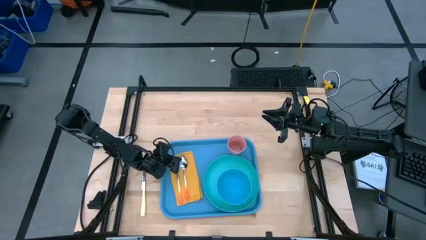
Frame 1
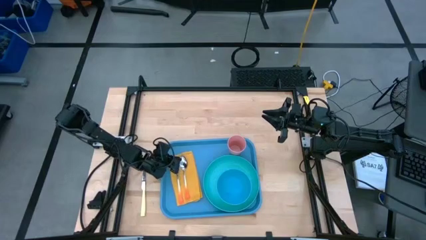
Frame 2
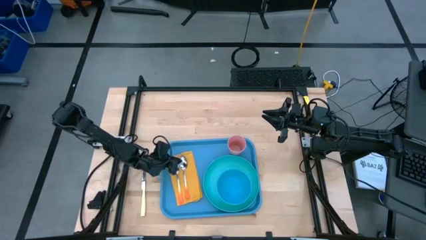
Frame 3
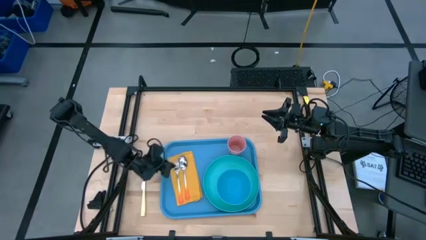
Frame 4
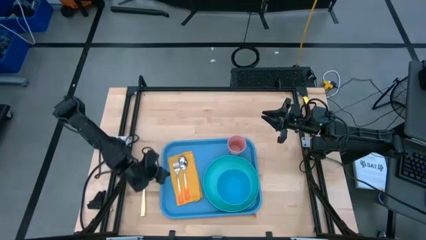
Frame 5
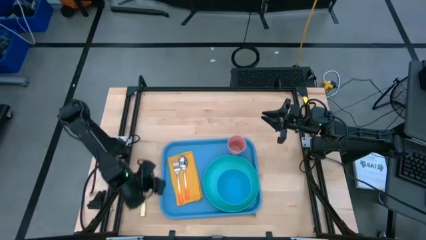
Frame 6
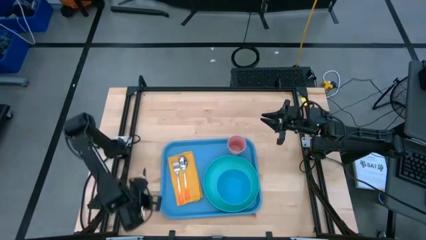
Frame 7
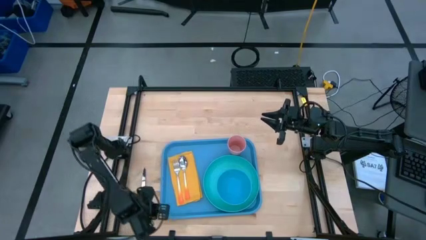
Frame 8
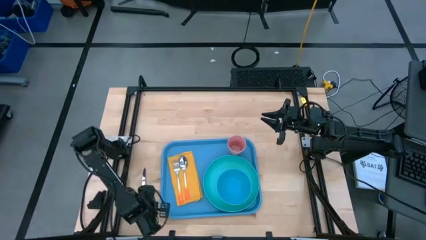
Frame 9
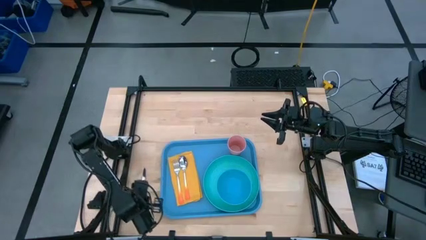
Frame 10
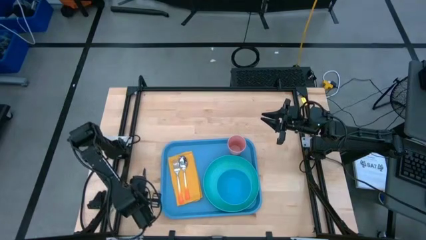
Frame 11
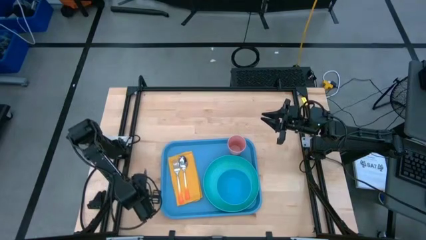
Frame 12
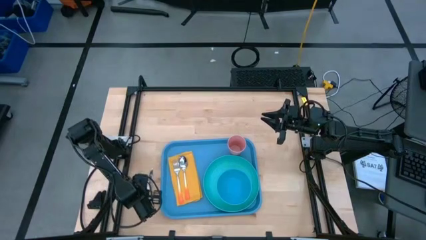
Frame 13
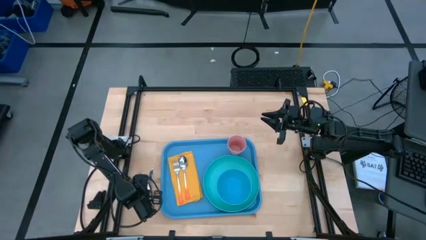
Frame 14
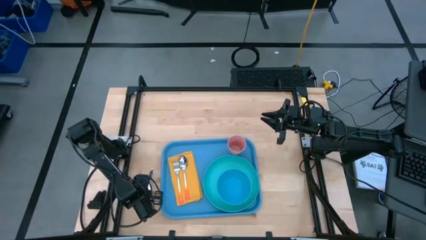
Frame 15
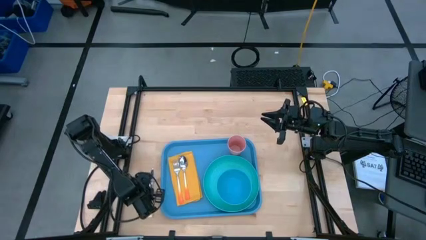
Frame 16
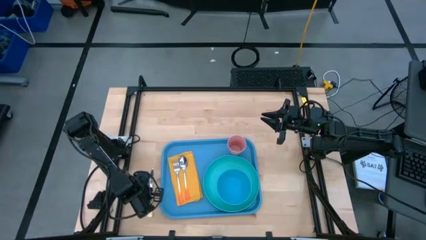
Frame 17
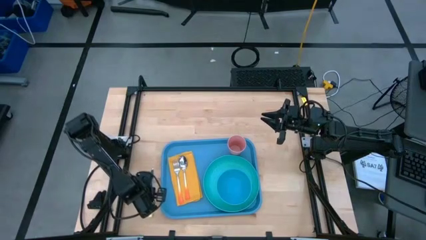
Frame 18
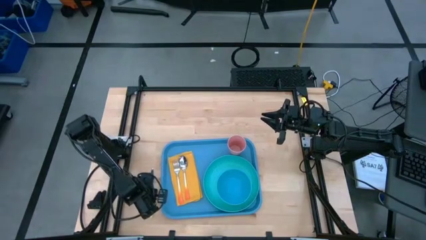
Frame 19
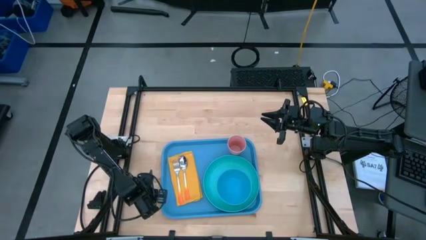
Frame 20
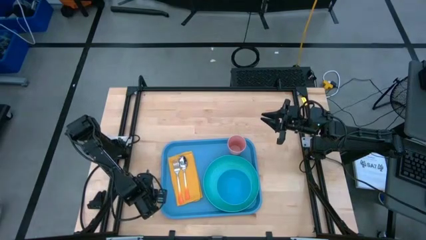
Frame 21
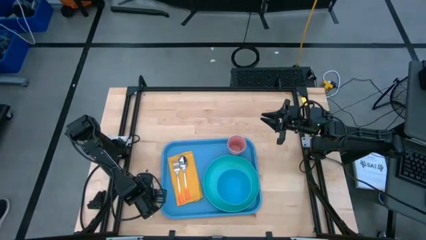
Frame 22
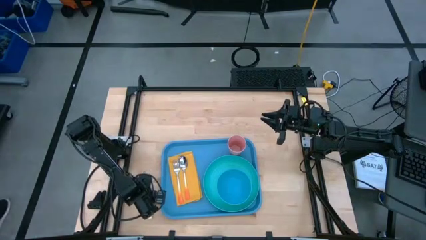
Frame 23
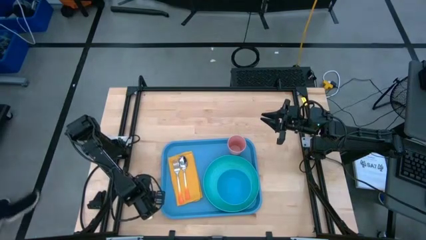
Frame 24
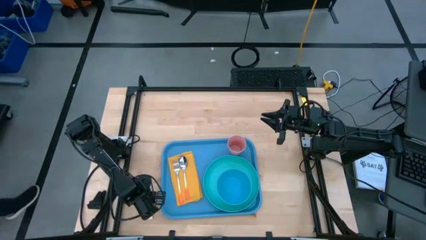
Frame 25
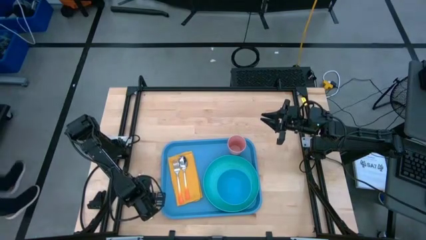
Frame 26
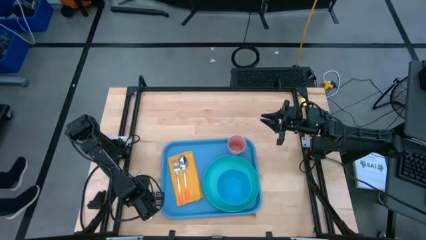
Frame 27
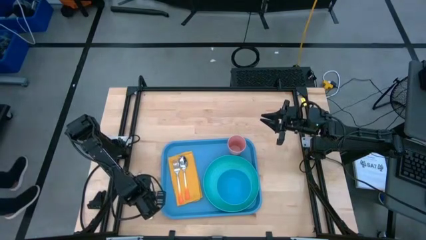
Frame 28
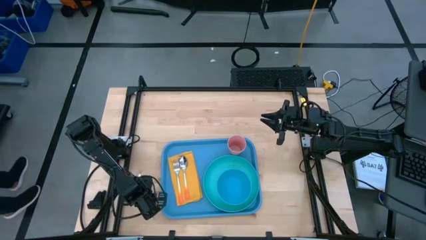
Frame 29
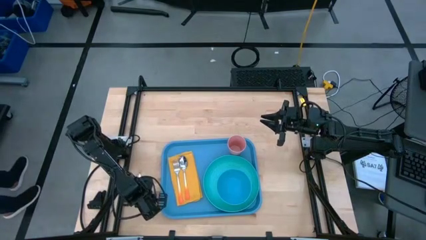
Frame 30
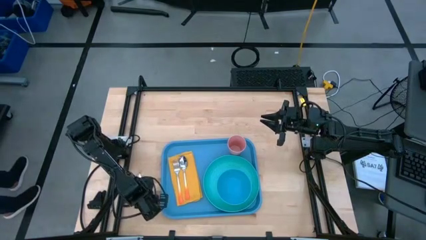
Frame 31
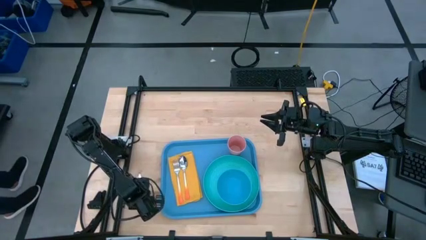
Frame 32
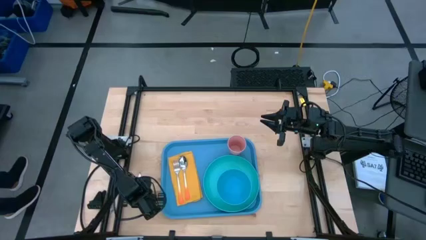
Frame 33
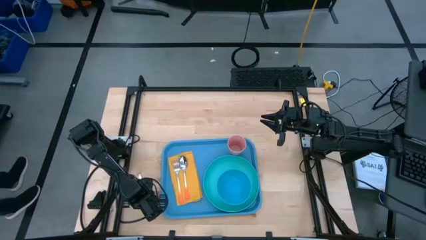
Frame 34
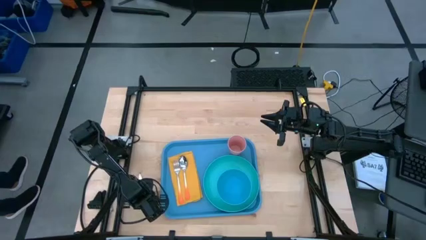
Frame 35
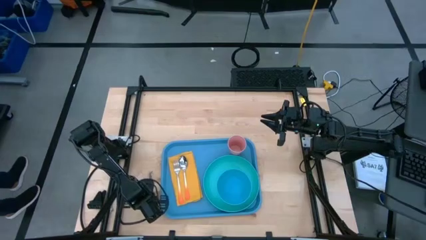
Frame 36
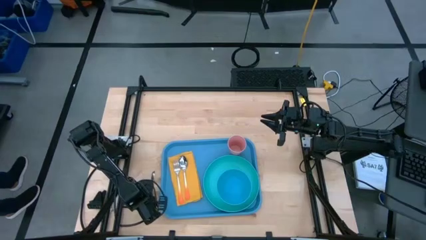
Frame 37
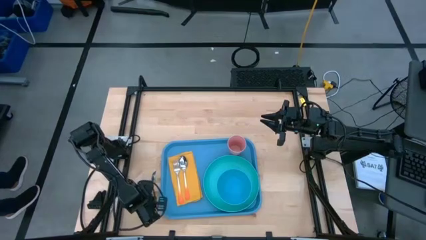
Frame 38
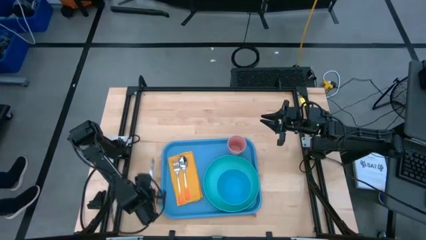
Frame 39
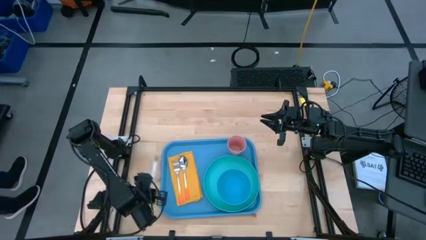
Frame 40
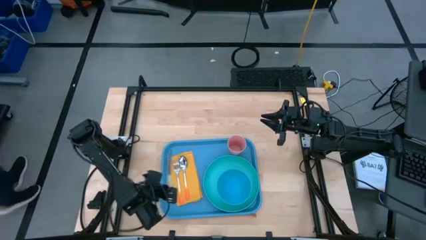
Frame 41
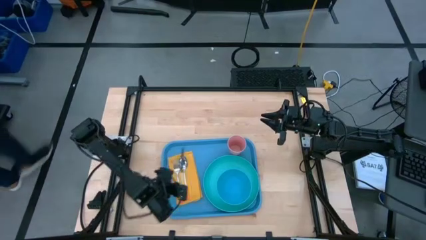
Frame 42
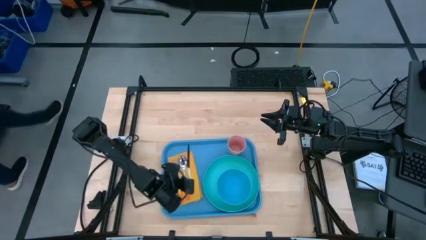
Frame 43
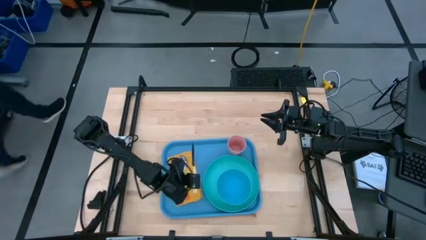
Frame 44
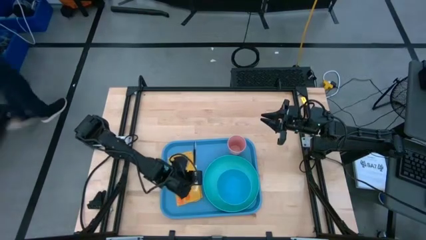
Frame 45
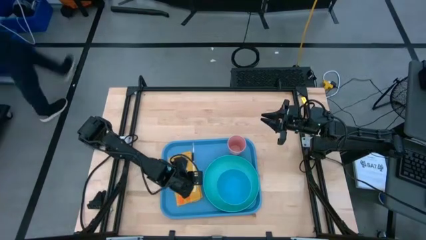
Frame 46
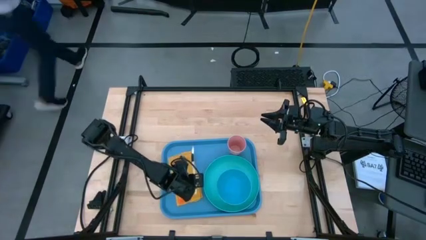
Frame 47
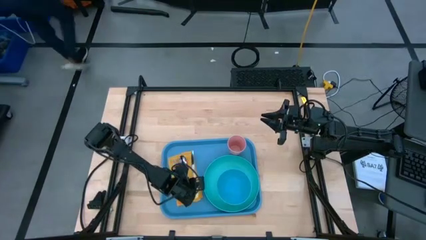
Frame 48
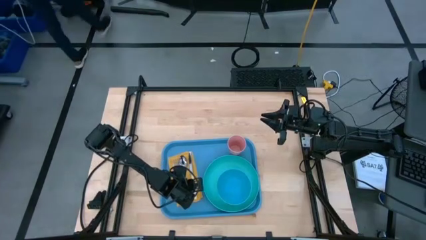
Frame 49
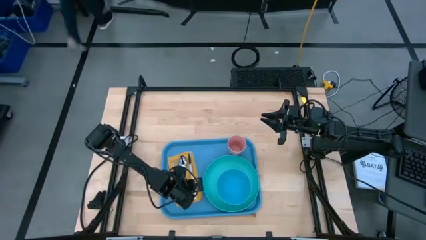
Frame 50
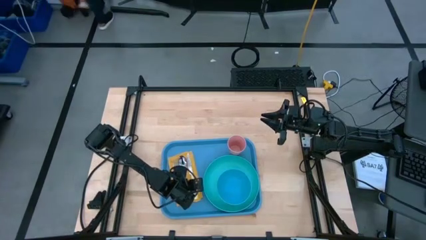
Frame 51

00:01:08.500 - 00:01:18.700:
Task: Set up tray
Put the knife on the yellow napkin

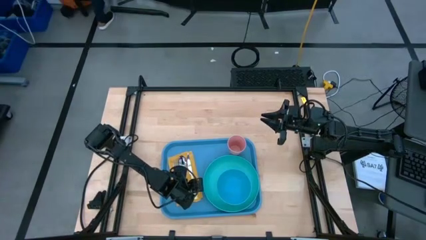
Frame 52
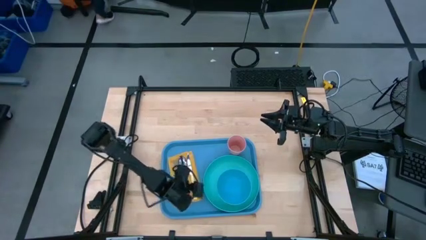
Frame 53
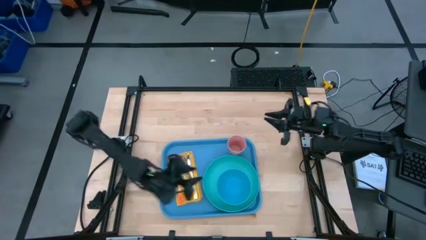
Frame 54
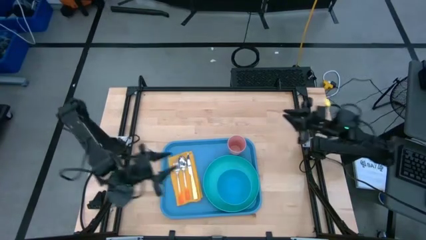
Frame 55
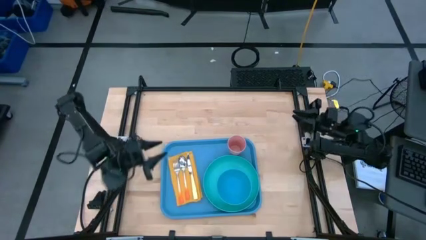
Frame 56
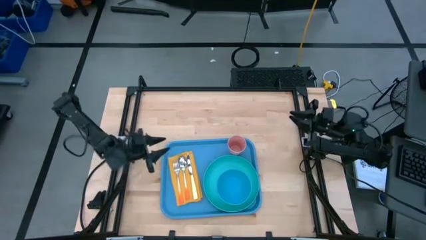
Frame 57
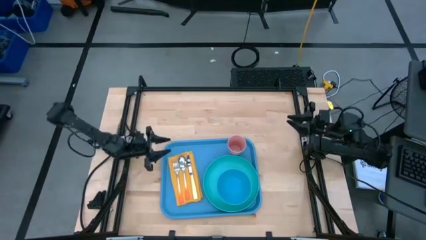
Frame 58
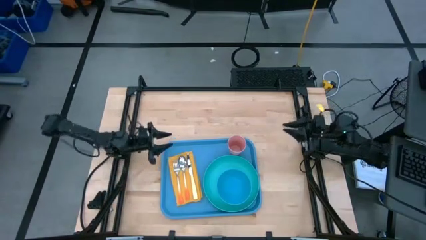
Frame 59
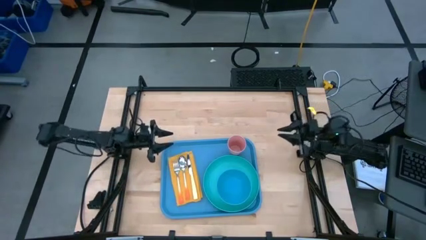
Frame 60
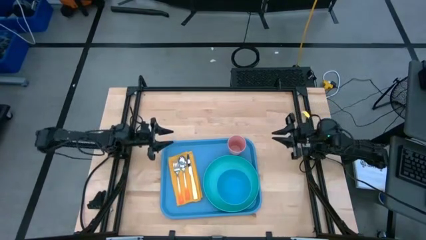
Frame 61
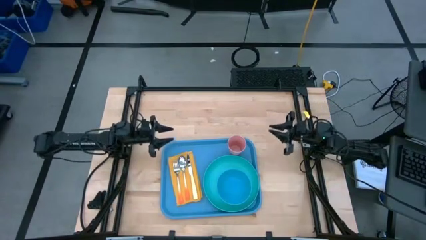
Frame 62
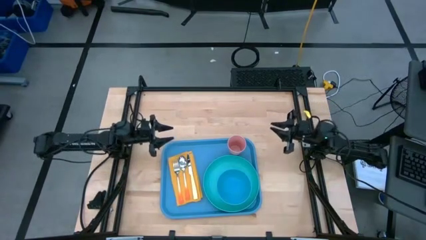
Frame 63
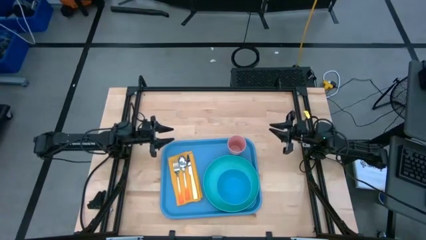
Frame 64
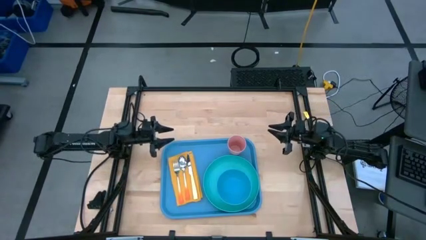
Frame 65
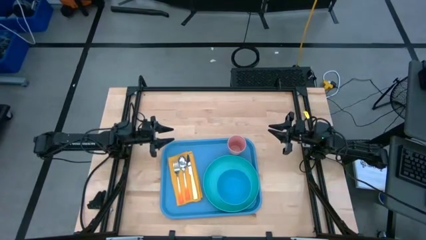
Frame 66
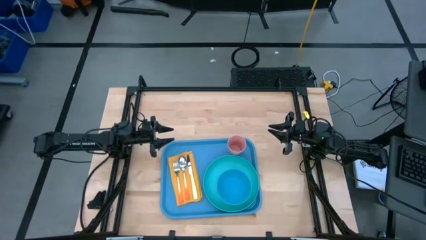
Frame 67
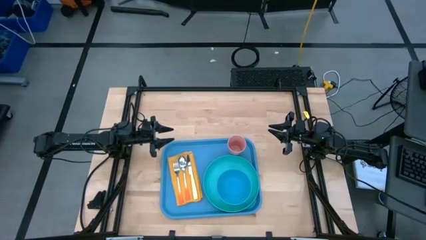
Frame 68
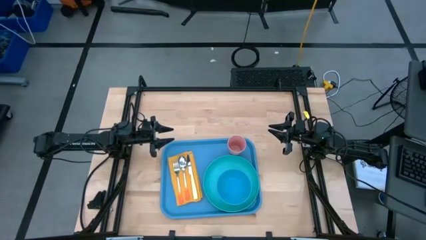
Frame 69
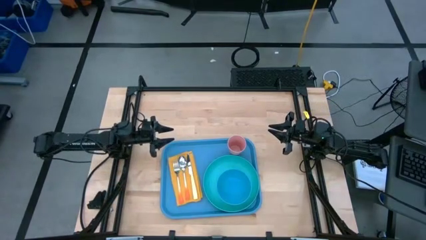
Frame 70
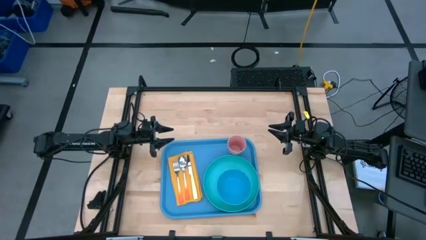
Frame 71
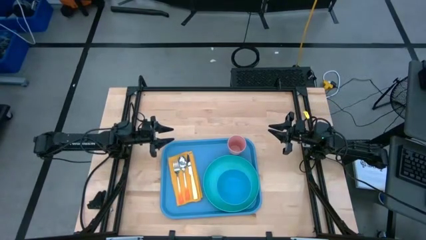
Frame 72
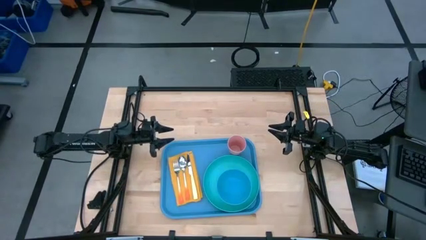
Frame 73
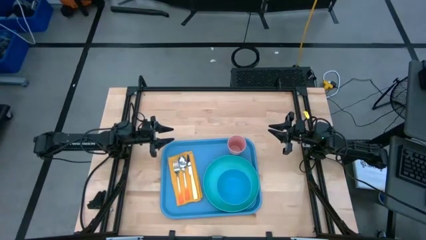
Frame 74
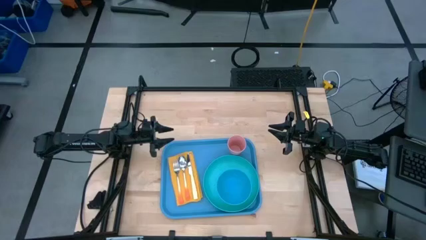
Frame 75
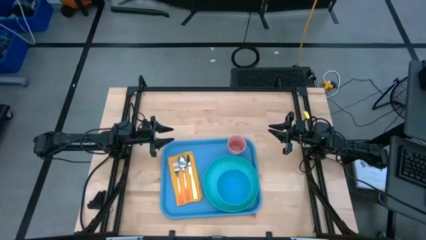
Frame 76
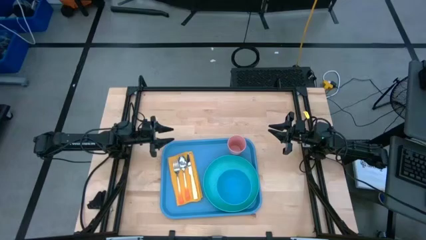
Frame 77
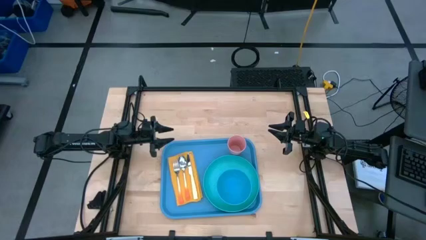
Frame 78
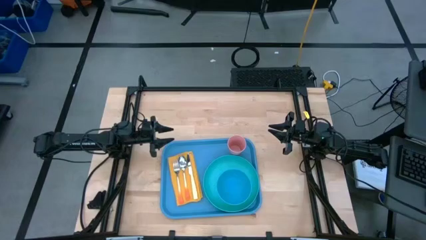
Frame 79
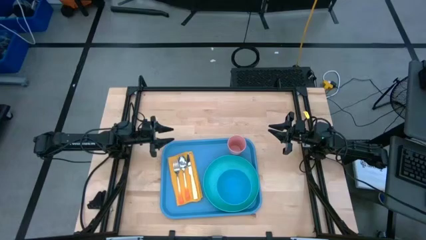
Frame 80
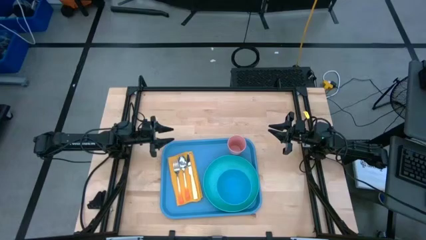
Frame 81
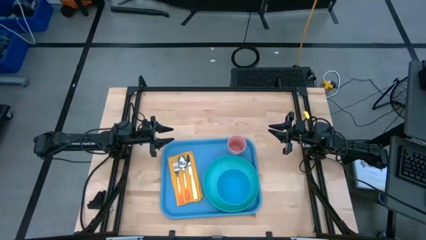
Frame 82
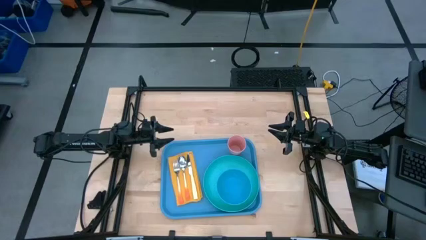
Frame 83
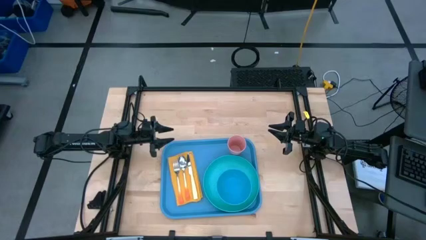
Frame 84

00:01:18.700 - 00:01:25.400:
Return to Home Position
